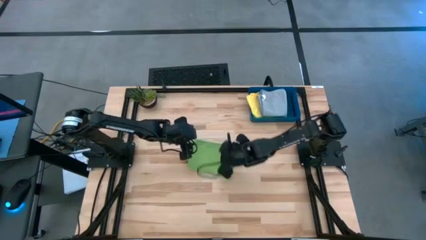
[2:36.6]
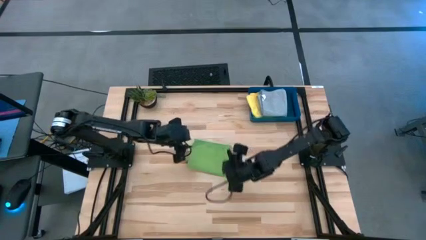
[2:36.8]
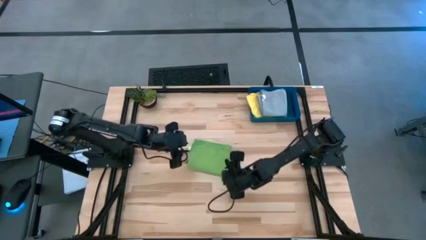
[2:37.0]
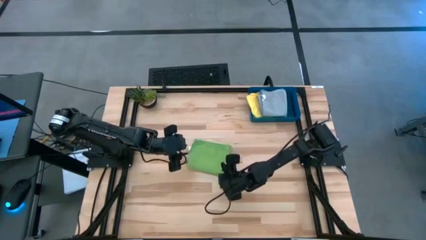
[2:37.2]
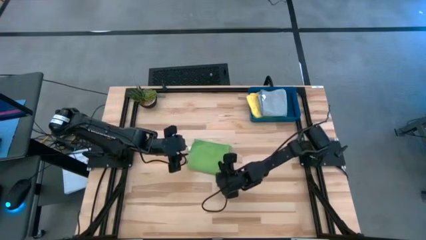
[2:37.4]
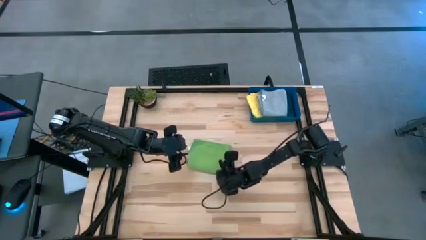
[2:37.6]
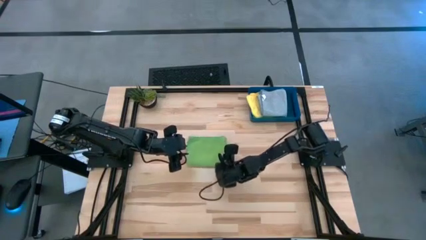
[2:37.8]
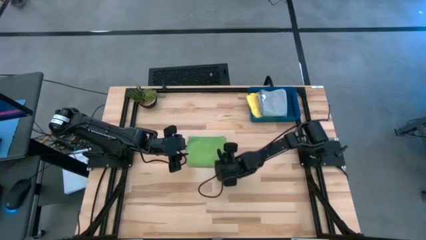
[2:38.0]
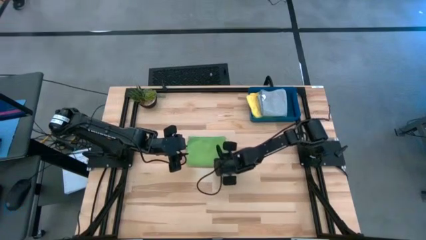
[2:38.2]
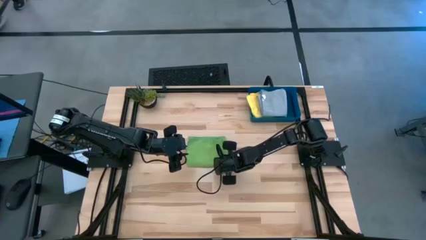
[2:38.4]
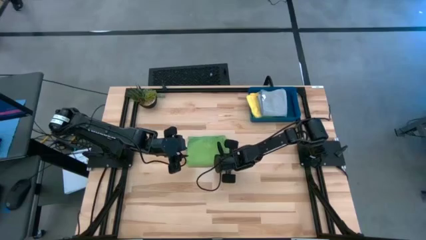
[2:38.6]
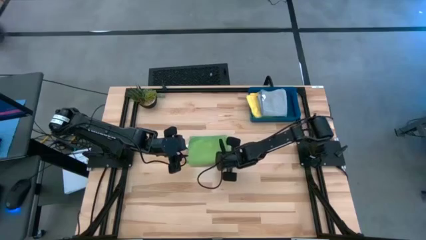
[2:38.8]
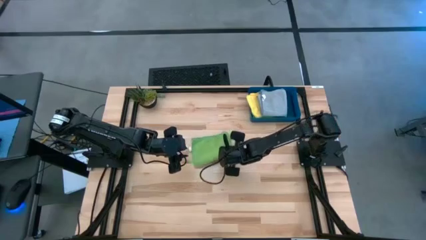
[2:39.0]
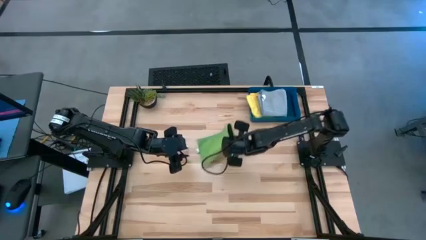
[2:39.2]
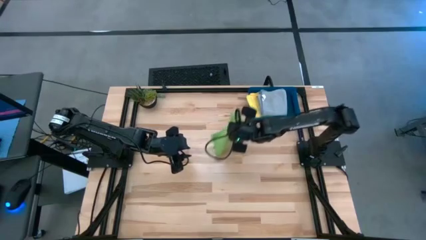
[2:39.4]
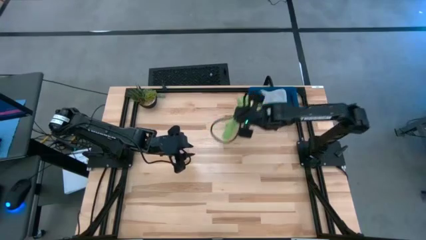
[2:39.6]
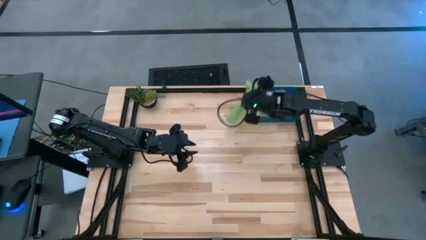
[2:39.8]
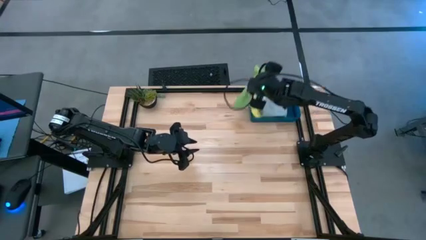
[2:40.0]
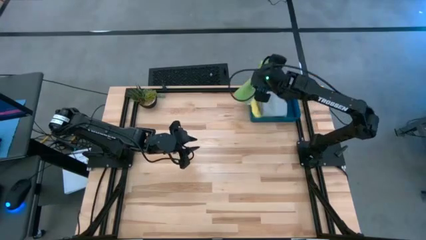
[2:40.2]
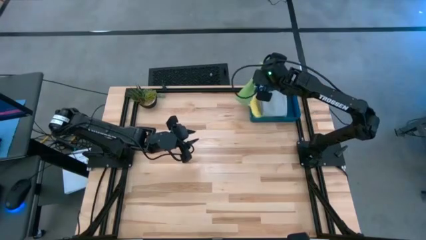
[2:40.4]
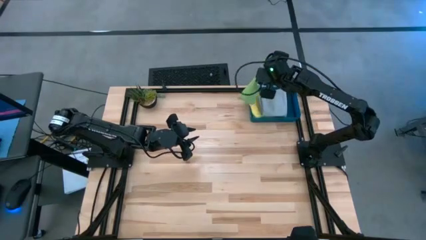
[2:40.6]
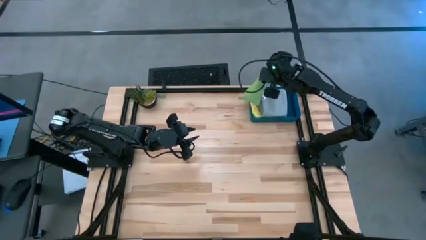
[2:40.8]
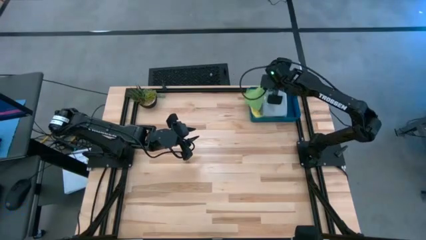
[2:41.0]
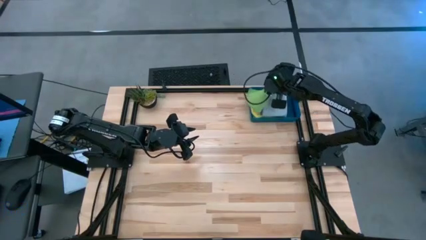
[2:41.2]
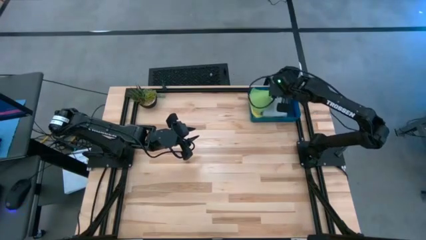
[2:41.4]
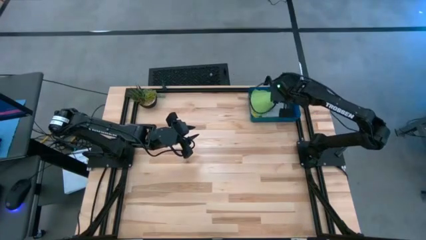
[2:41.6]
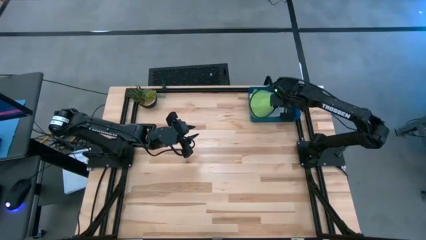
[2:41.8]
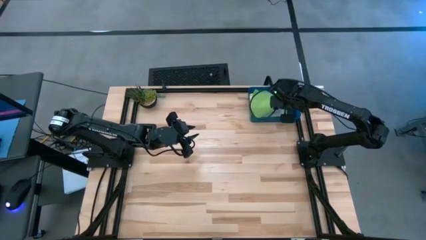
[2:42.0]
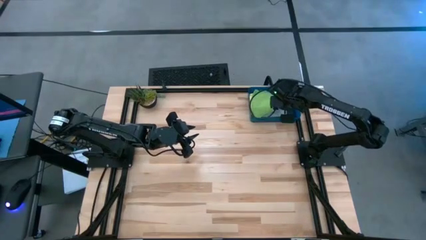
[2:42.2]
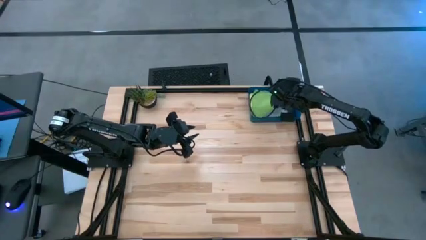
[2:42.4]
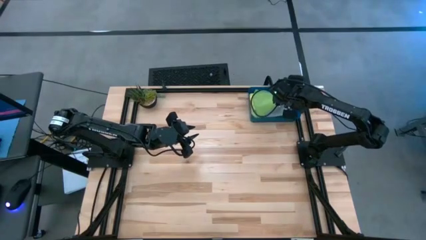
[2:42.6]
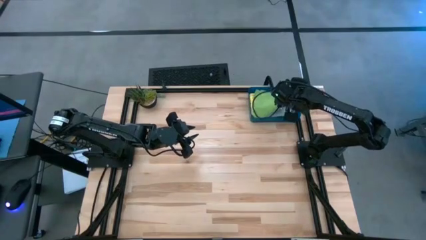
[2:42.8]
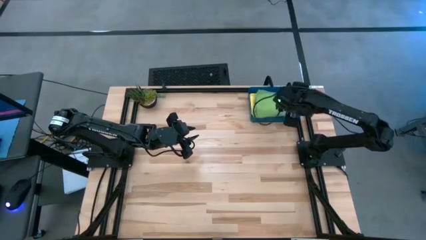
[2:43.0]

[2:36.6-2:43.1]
Task: Fold microfiber towels
Stack the green microfiber cloth on top of the gray microfiber cloth in the blue bin

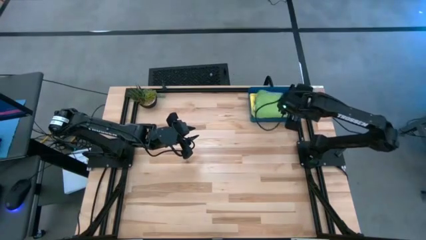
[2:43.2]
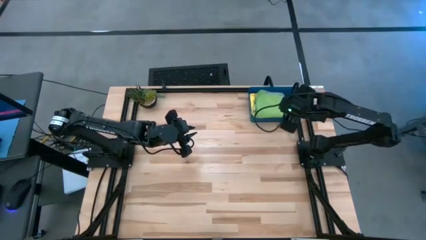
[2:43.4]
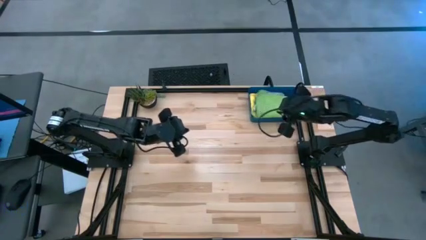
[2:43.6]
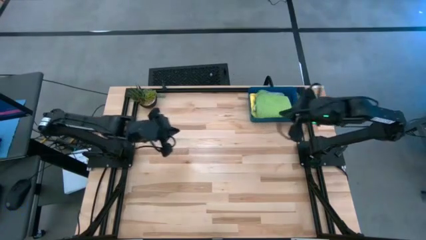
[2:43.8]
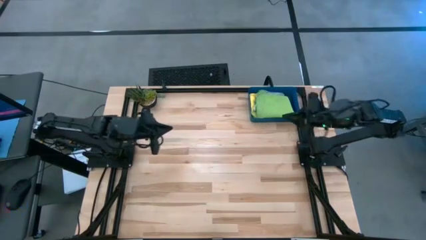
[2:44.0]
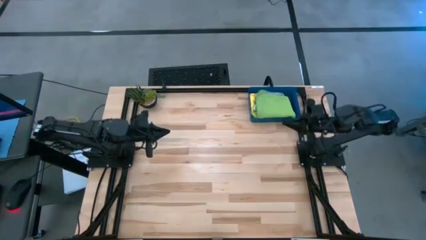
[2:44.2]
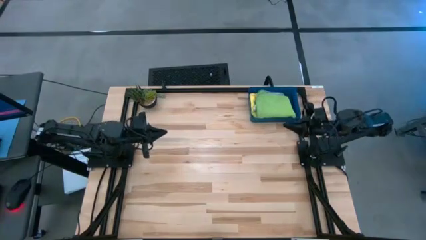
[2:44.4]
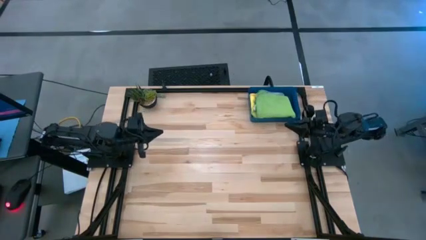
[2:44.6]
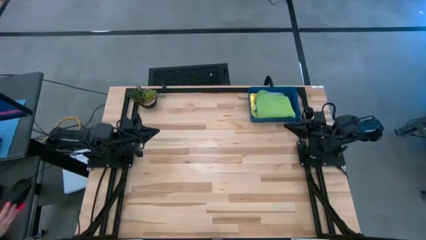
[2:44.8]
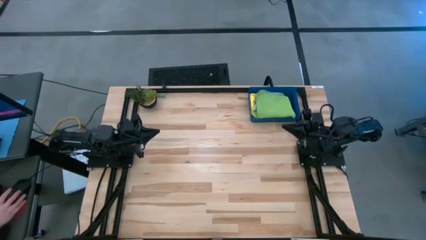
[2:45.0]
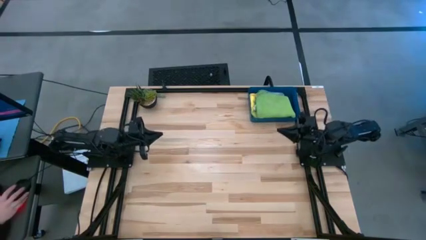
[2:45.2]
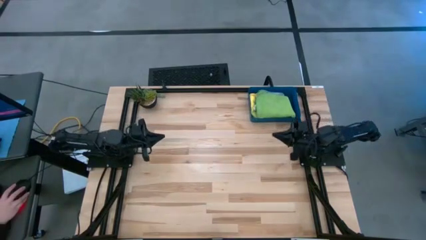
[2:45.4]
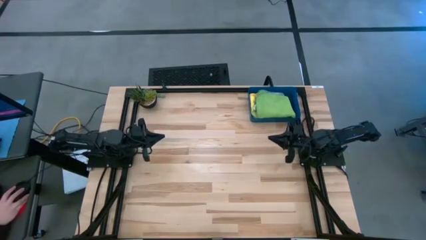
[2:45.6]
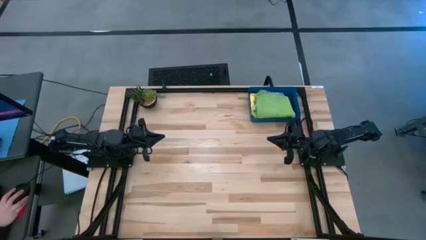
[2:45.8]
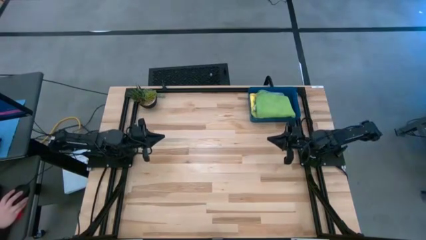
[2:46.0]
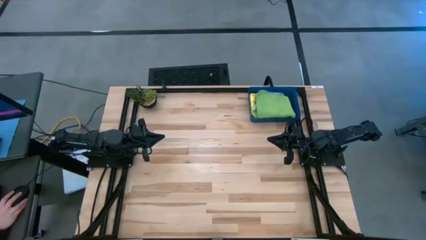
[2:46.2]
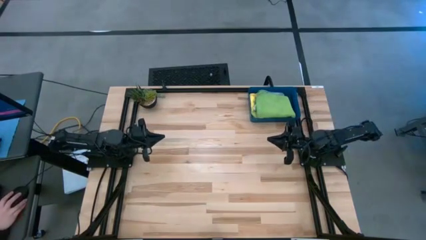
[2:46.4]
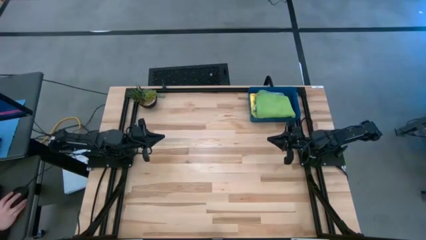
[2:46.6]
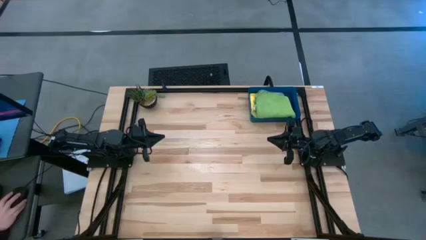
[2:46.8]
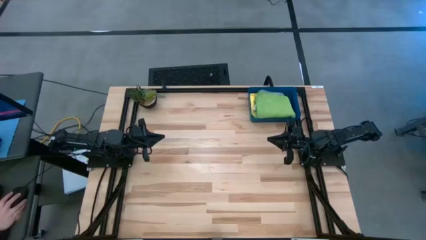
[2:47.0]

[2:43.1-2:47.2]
Return to Home Position

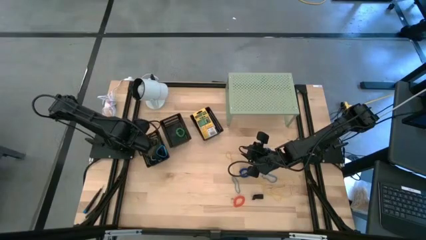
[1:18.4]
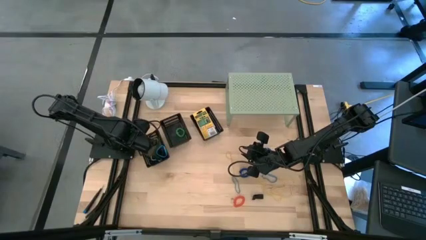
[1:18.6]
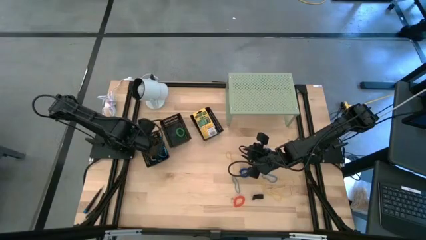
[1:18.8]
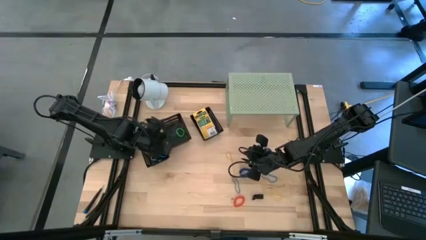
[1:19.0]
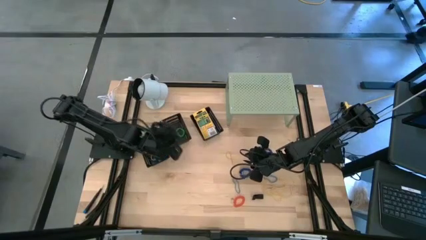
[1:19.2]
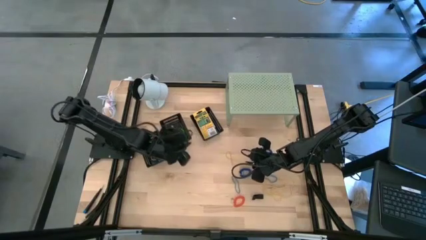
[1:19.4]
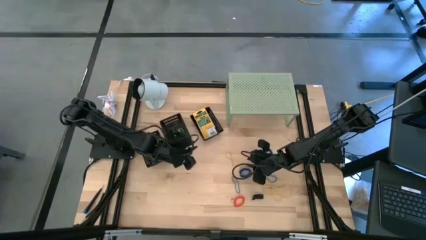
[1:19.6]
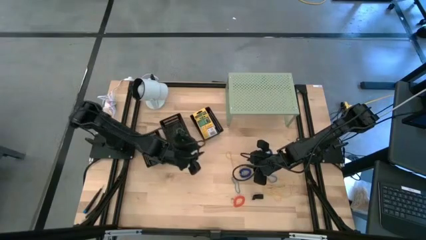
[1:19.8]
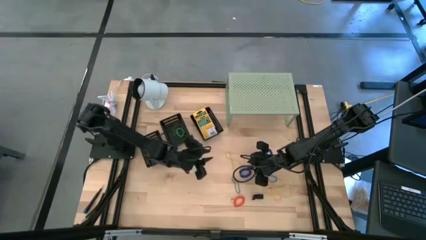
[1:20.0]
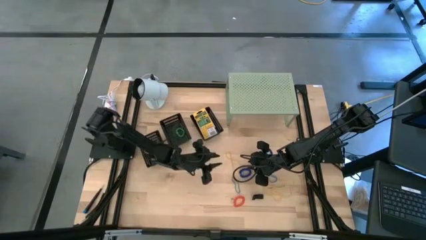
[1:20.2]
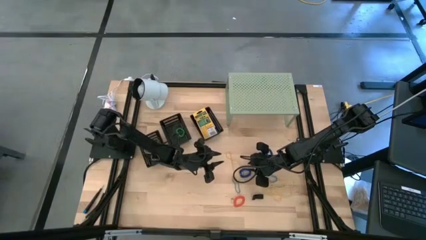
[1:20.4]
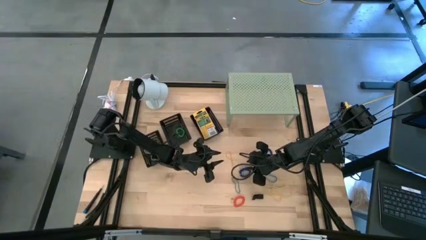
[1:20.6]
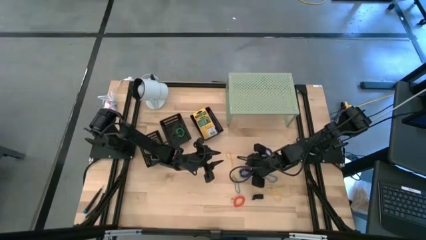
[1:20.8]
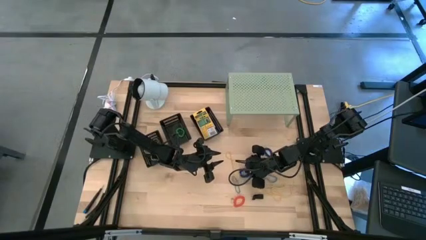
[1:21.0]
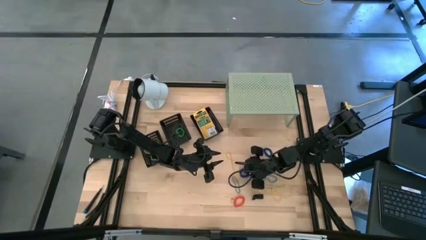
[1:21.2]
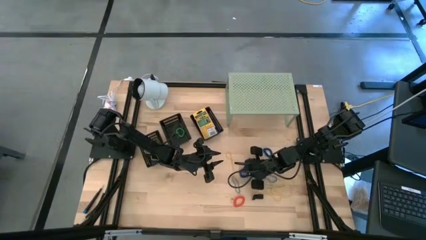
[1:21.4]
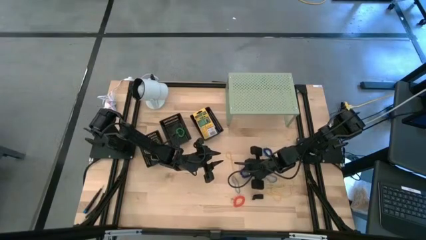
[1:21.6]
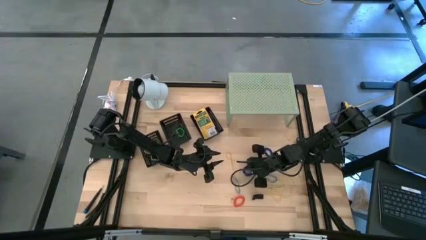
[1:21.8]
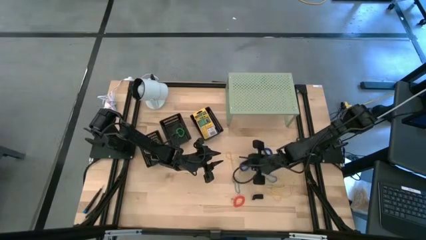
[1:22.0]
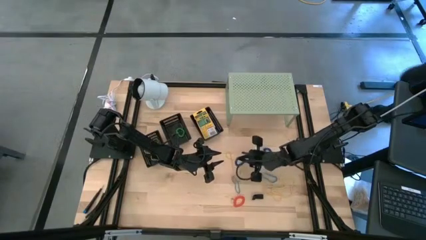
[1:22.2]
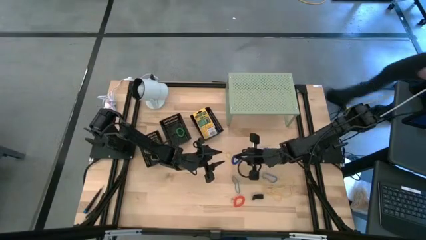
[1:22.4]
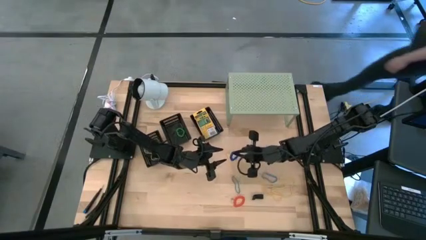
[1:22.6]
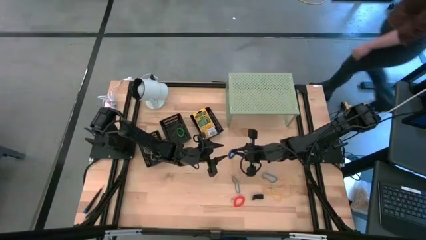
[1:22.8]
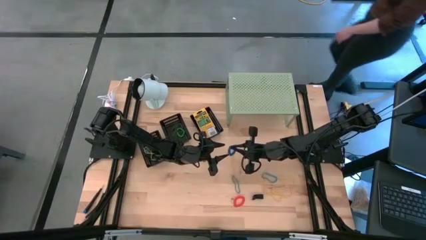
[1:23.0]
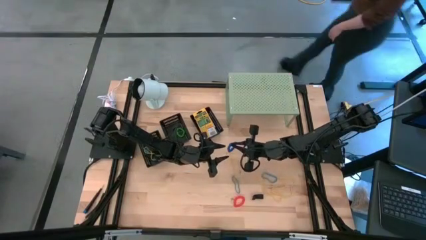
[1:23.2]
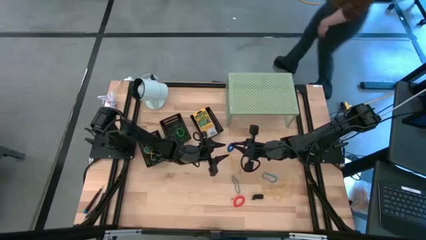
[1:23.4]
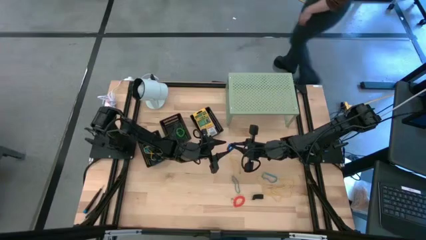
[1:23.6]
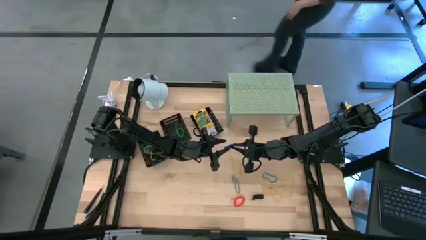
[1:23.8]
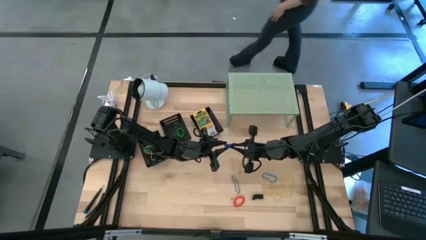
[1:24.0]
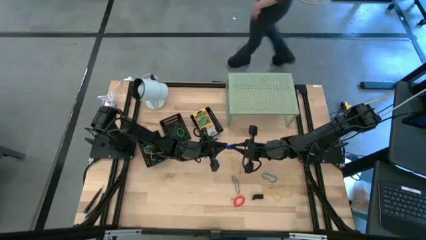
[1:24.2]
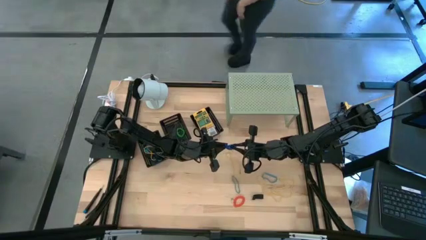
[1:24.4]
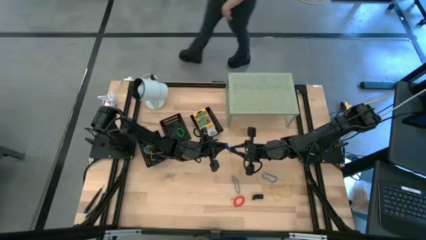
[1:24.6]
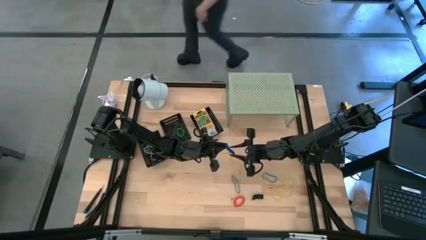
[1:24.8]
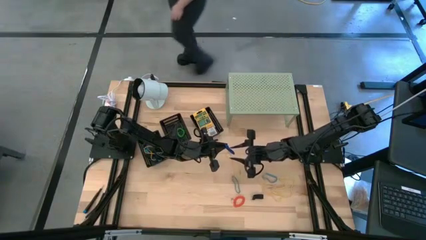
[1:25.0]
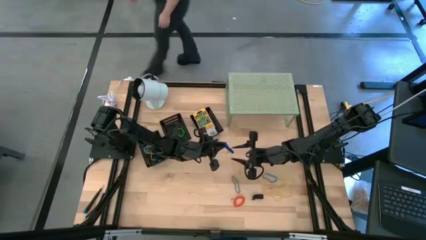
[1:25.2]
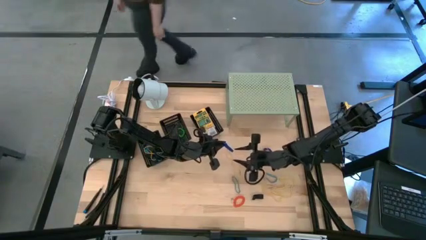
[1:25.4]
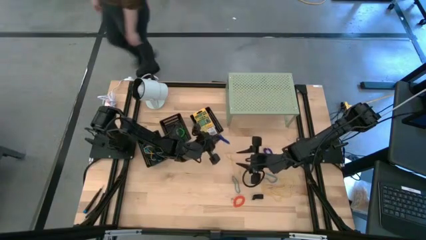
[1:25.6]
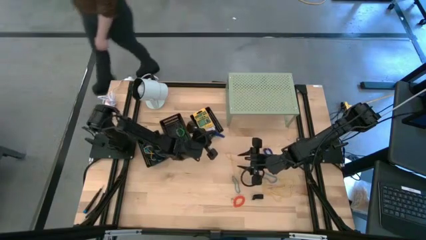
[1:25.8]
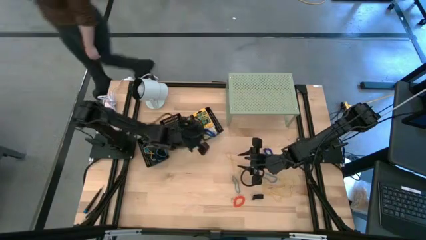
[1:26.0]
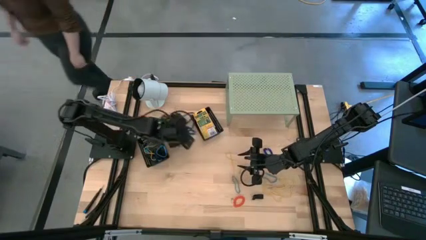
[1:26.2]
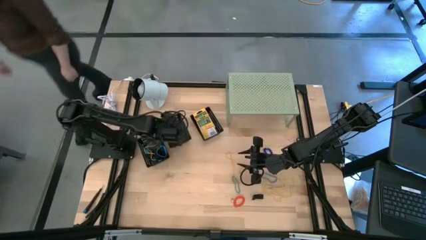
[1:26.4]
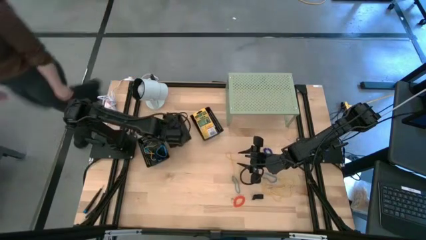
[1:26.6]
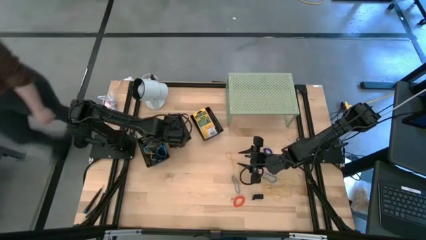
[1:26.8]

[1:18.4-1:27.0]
Task: Pick & Place Office Desk Supplies
Put the blue spring keychain into the middle black basket
